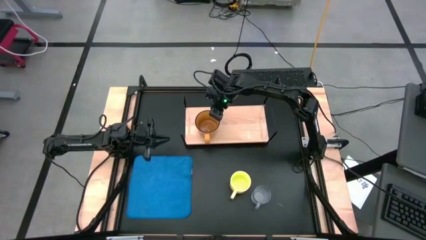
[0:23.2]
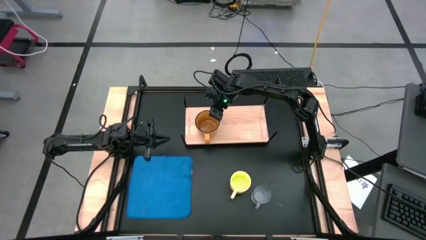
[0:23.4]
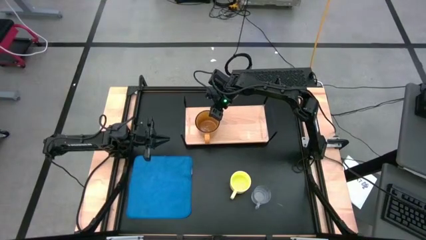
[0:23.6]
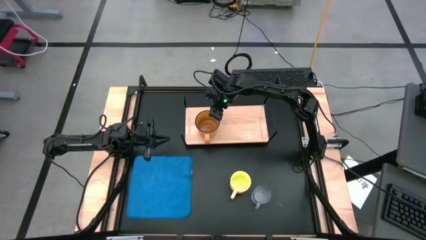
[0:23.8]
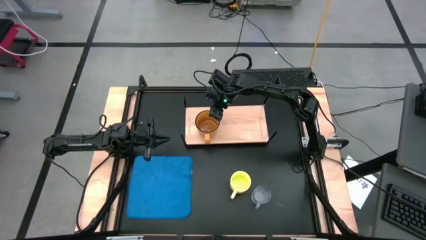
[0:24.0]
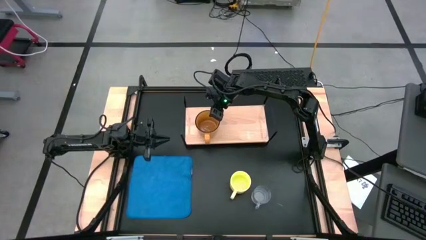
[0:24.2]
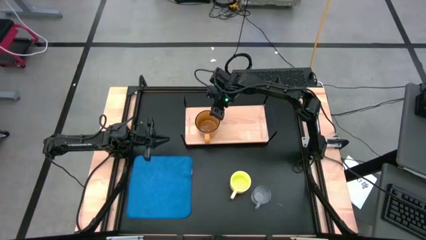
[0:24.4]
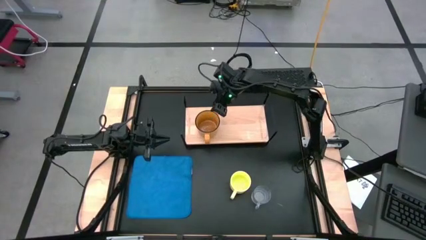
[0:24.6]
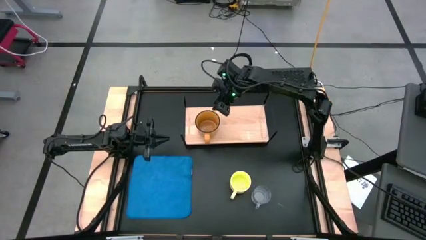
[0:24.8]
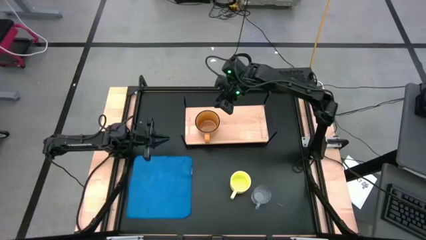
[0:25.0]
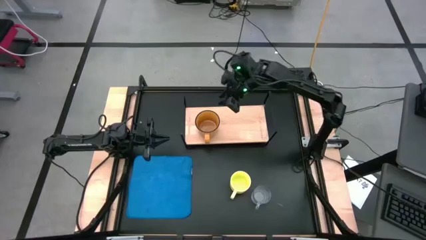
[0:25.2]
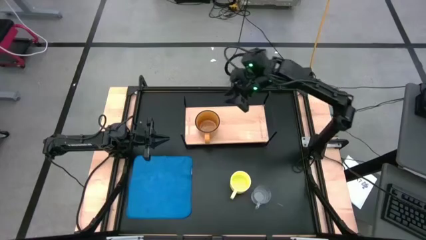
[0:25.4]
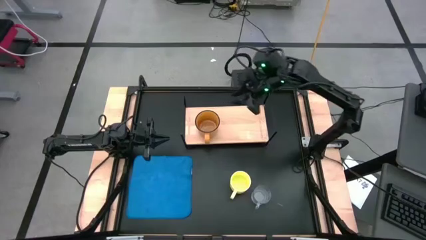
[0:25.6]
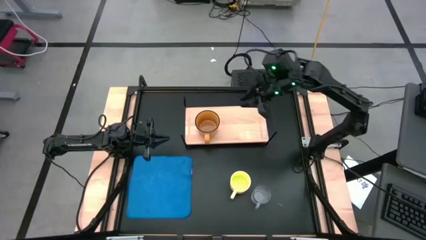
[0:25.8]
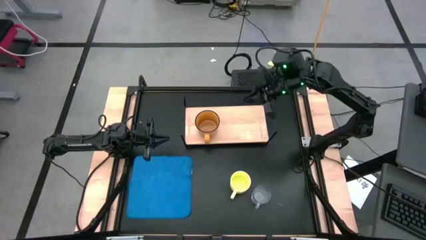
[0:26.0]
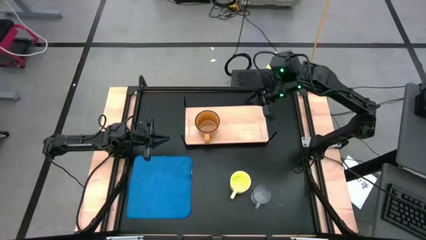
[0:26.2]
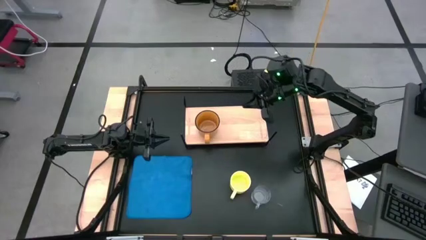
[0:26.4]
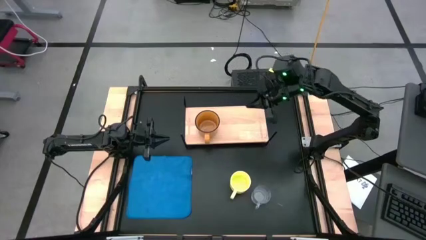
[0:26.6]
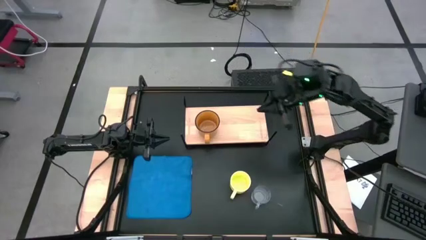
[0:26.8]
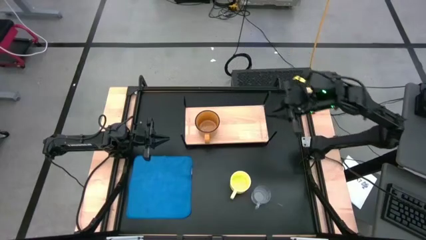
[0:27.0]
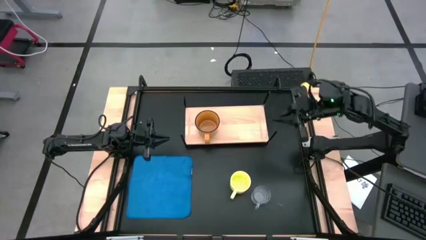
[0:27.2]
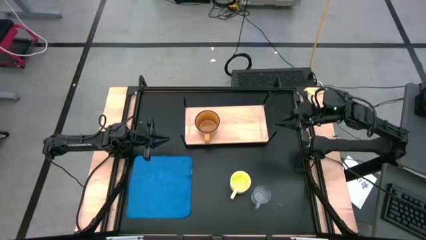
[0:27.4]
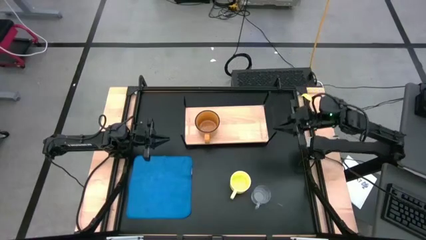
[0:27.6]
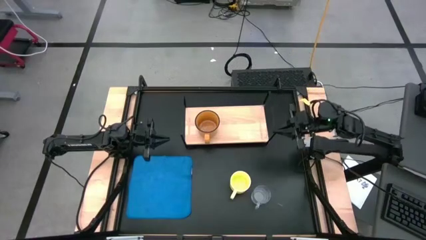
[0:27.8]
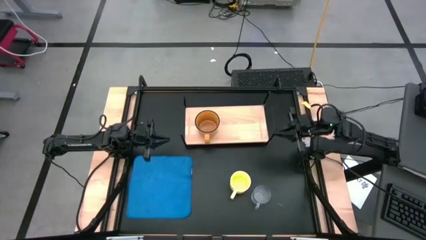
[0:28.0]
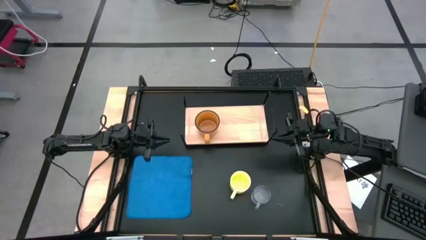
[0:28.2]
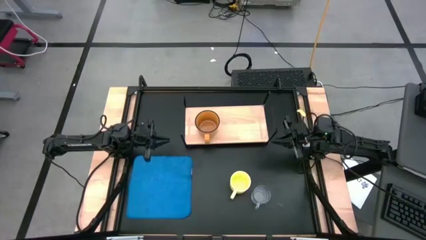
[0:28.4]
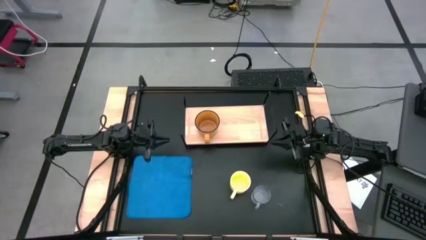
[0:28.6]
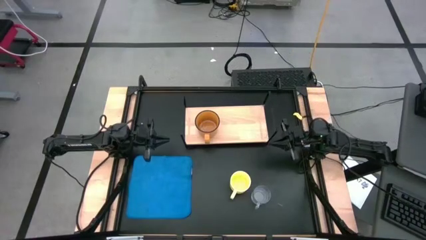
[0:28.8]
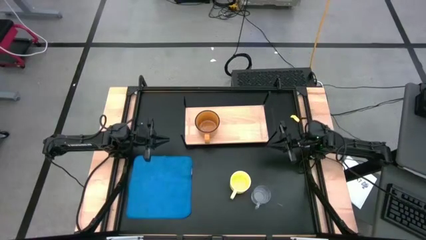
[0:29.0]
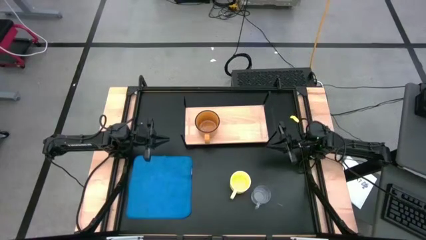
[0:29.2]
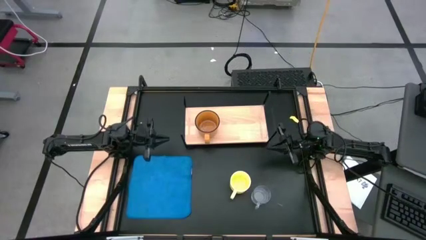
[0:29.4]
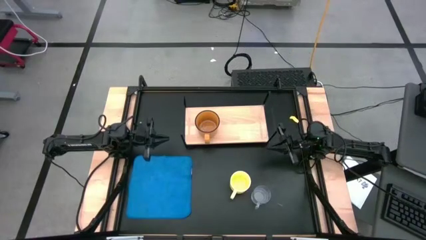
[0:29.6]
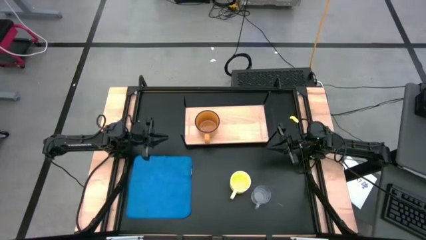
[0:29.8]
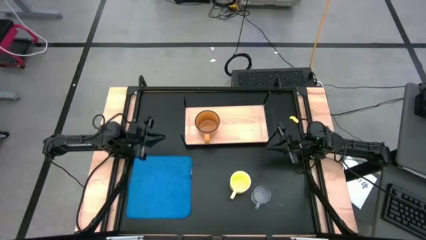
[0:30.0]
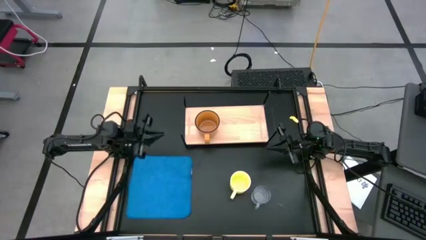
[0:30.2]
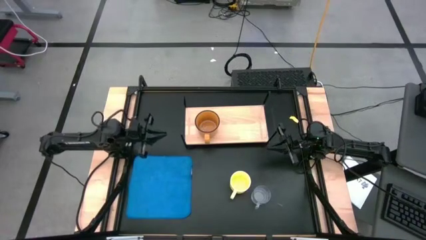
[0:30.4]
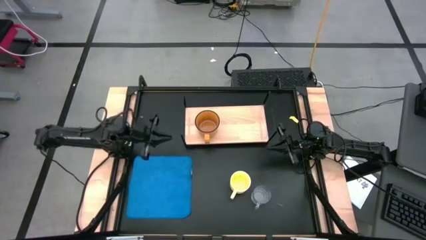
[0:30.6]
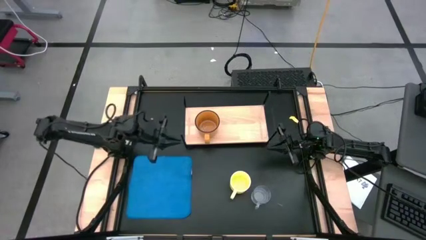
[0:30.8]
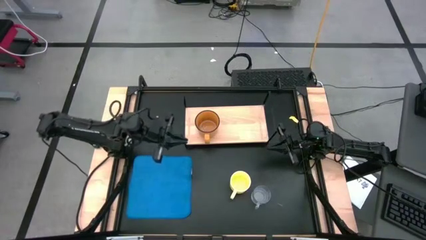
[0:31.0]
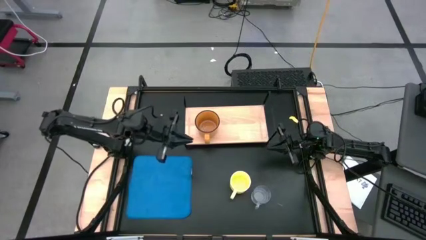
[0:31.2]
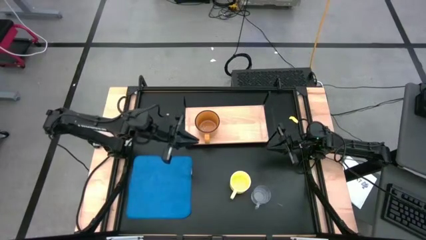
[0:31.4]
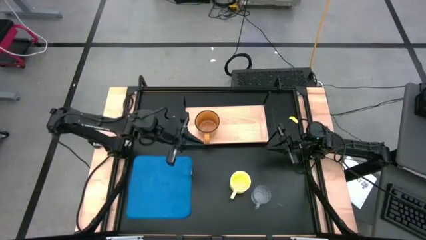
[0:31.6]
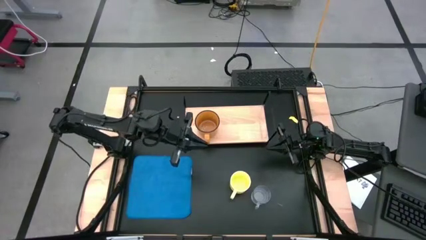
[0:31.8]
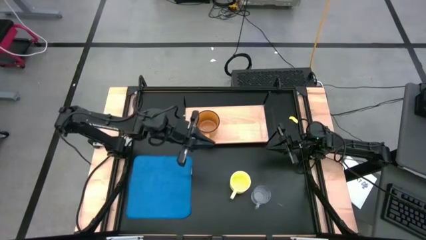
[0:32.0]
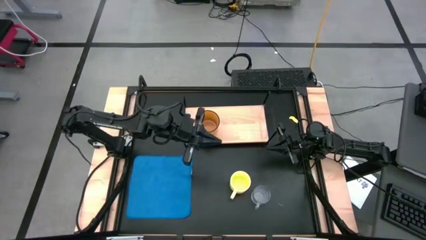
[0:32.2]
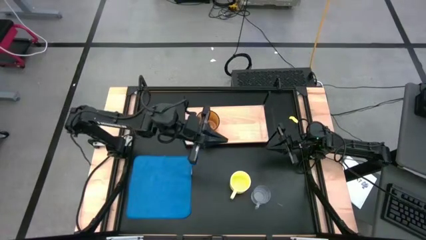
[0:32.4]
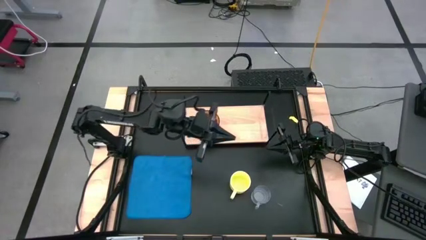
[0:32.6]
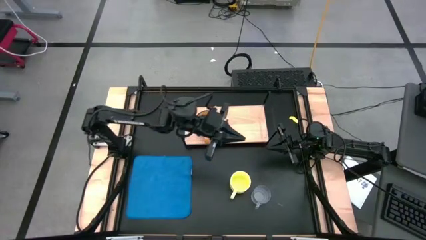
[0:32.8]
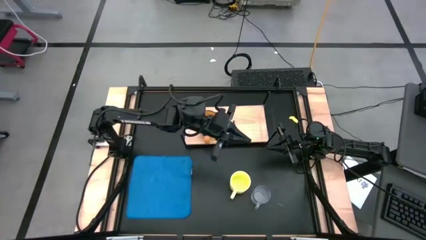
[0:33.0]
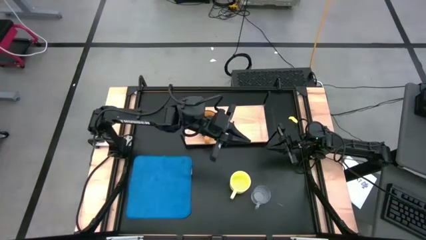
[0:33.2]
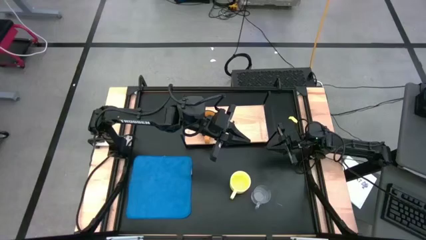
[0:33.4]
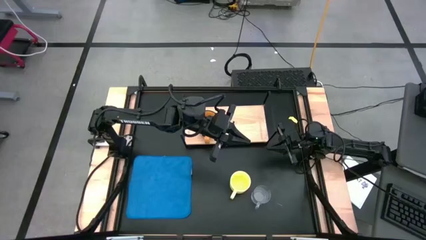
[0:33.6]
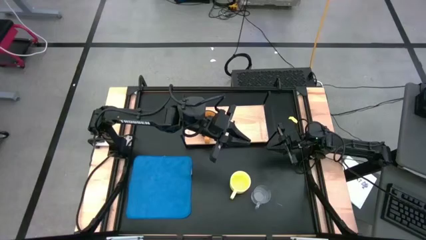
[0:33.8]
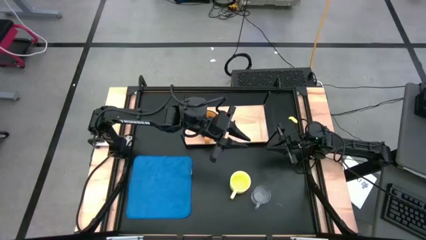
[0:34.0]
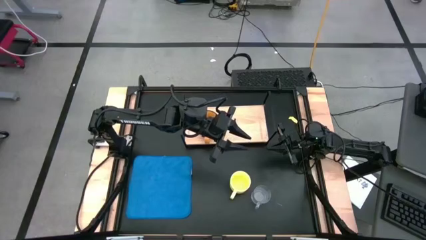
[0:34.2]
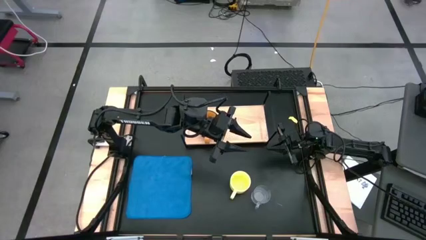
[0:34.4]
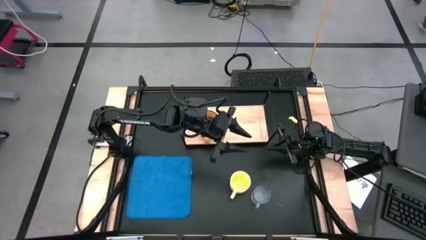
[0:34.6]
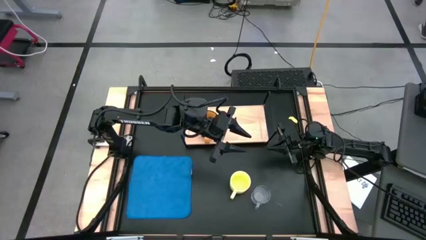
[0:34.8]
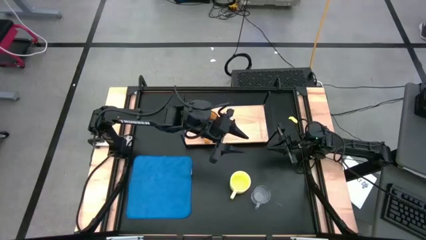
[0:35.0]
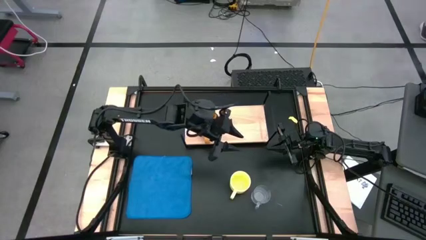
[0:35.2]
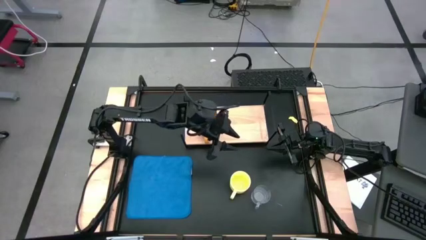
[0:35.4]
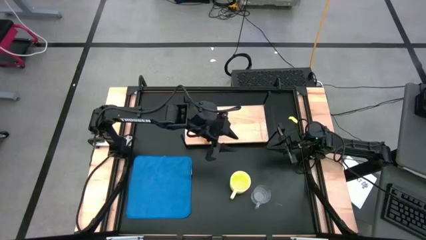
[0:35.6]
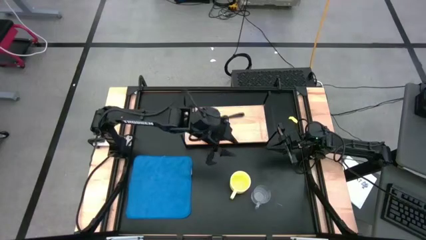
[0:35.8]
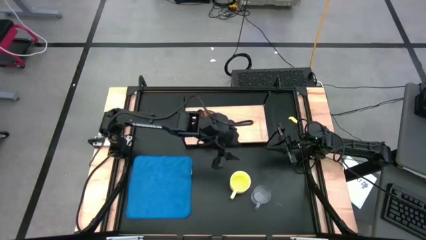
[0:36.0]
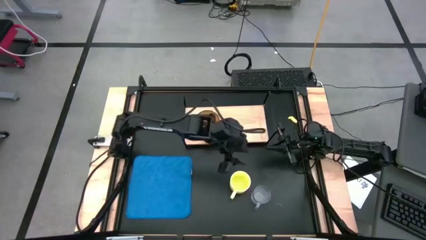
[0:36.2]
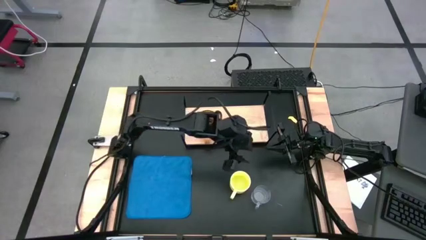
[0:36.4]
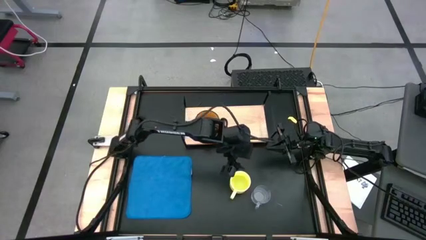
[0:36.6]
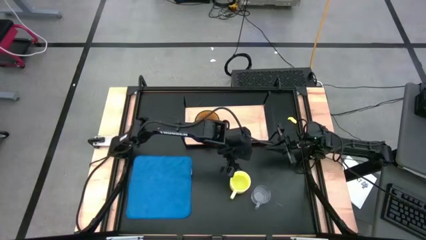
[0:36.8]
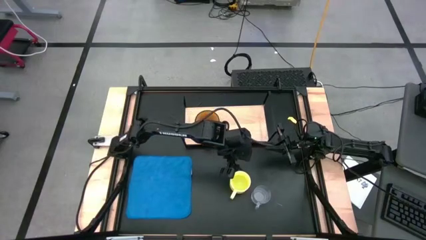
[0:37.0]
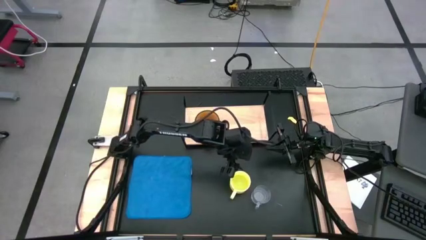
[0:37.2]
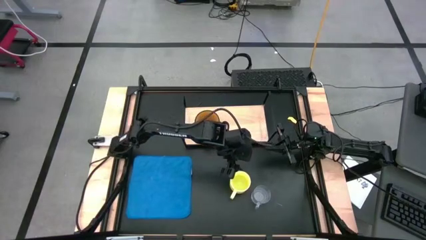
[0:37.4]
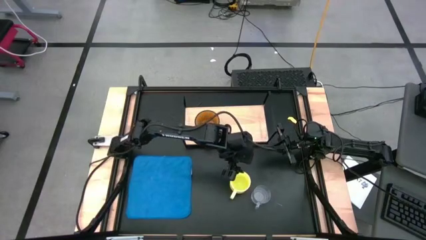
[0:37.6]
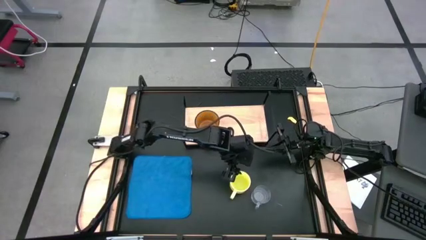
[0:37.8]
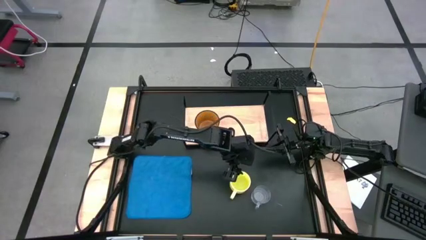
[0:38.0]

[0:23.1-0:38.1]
Task: Stack small to large cups/mugs on shelf
Put the yellow mug on the shelf
